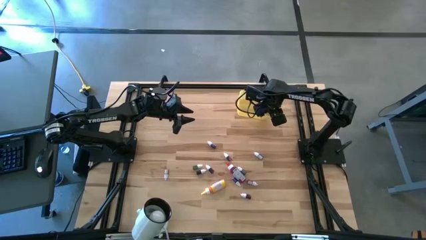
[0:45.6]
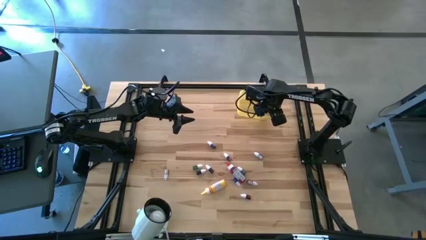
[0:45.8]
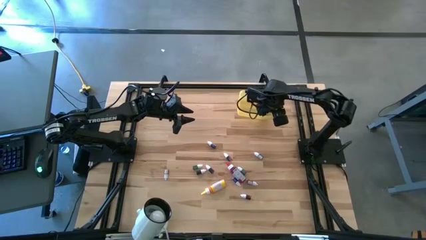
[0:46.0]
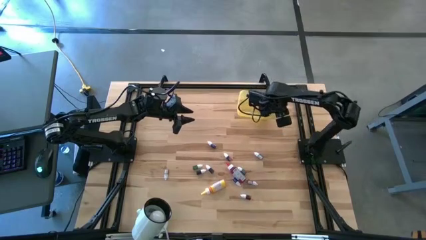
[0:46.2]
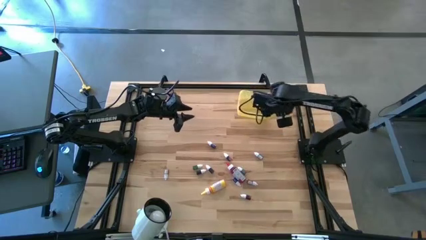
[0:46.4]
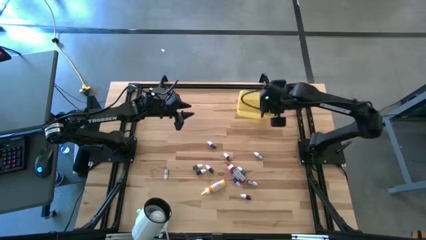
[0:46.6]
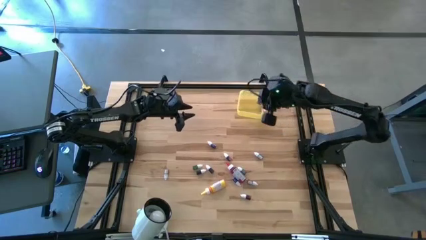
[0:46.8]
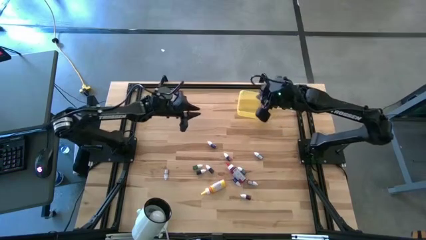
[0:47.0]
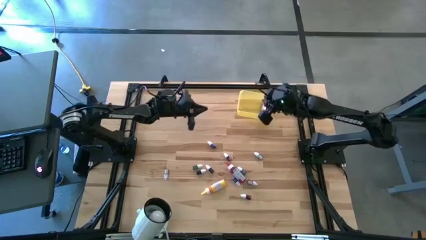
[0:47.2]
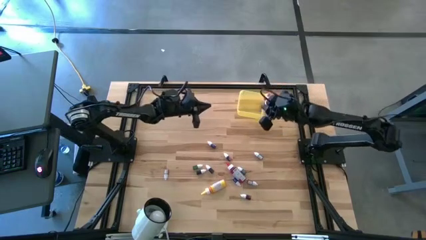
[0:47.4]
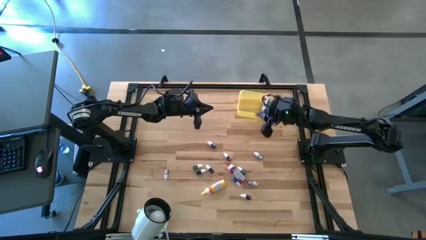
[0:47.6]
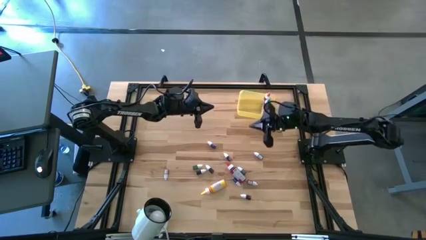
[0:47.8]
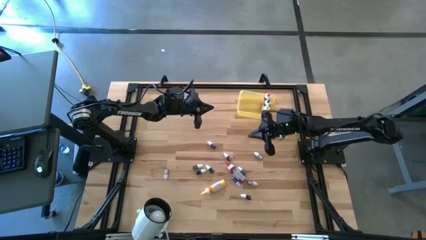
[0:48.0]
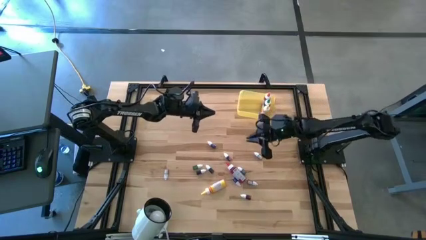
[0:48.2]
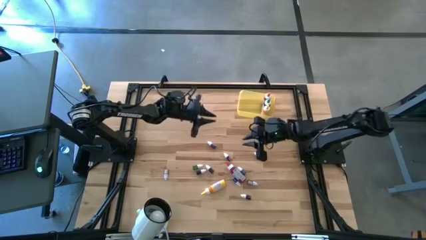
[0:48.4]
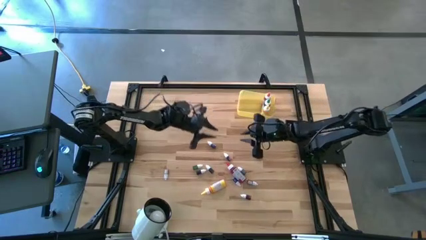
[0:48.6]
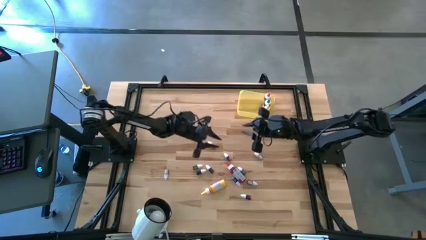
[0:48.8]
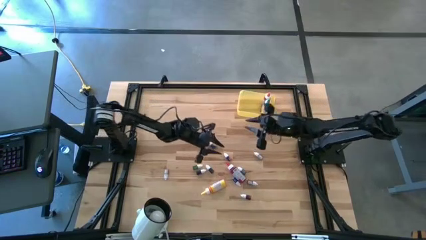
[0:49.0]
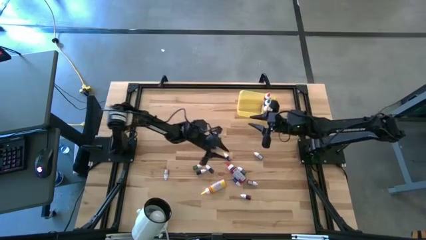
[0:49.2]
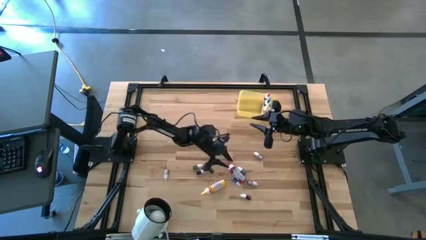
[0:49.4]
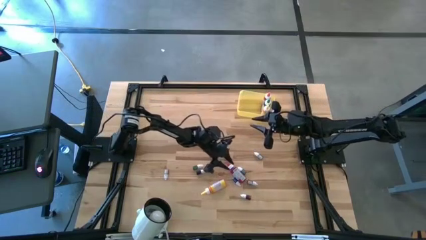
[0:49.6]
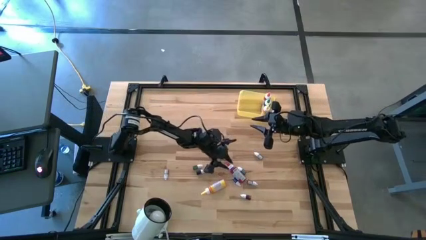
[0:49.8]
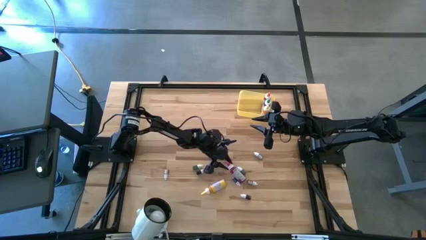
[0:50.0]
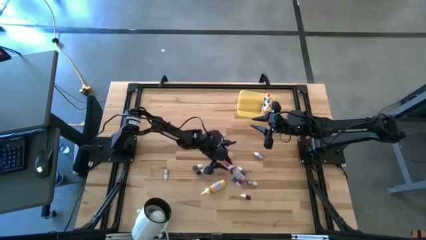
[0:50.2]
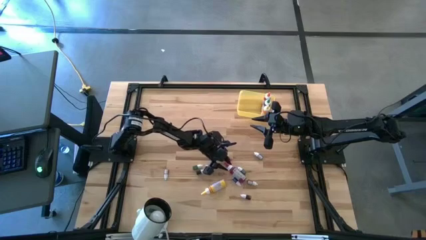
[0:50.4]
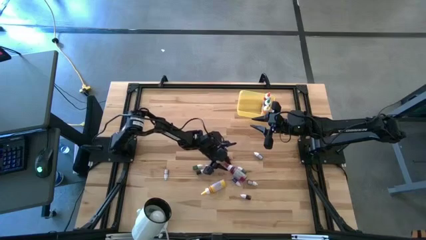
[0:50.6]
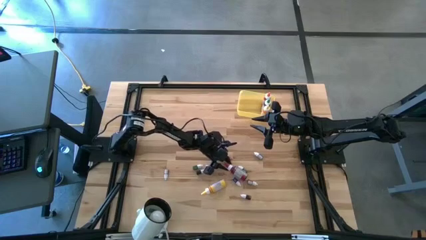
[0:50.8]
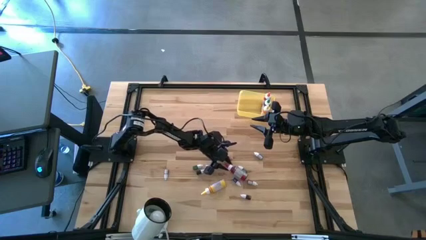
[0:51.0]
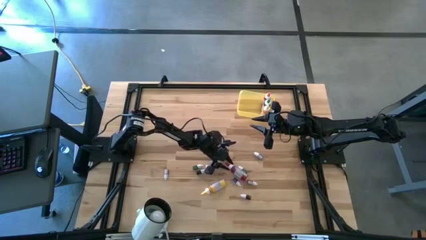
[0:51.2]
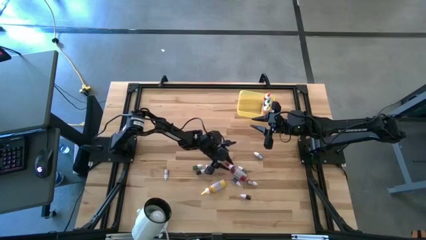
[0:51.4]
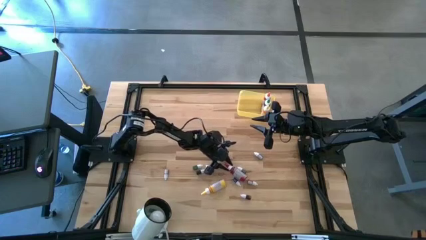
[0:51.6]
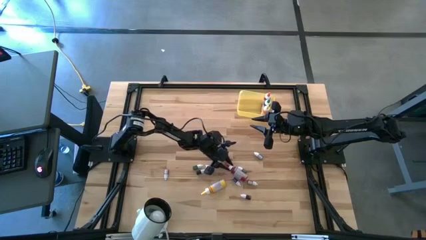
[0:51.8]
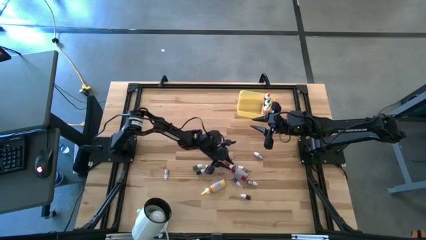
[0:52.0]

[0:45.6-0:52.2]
Task: Pick & Place food coloring
Put the big red food coloring bottle into the yellow bin

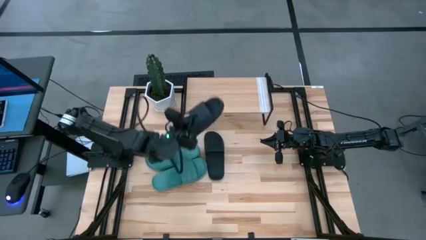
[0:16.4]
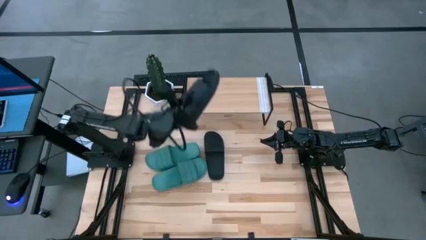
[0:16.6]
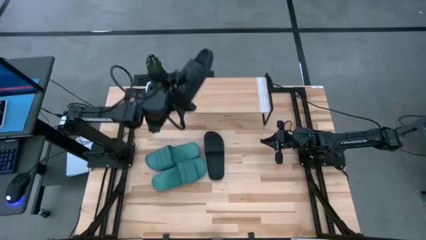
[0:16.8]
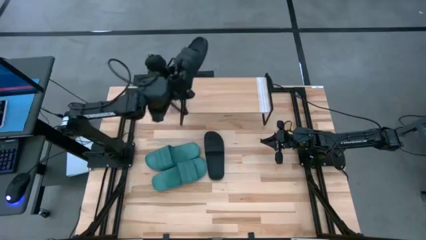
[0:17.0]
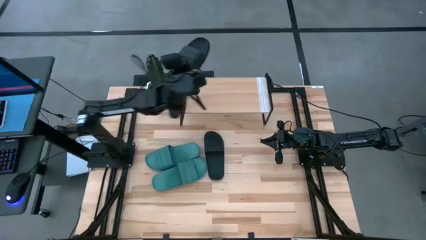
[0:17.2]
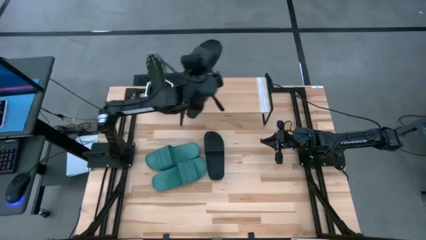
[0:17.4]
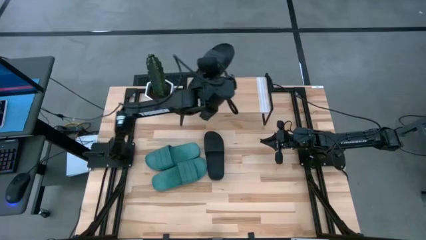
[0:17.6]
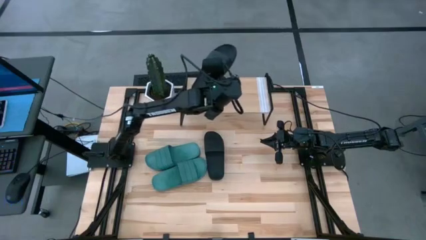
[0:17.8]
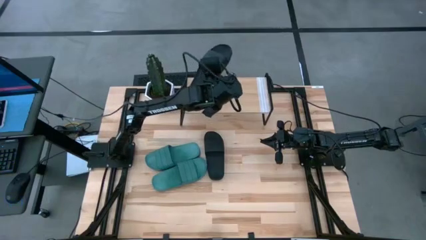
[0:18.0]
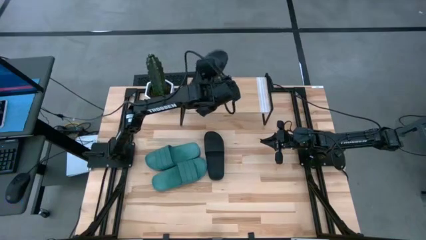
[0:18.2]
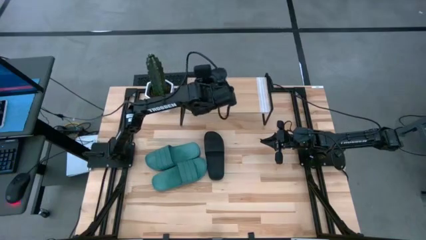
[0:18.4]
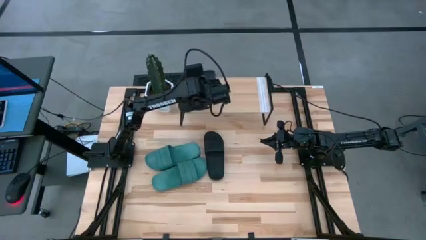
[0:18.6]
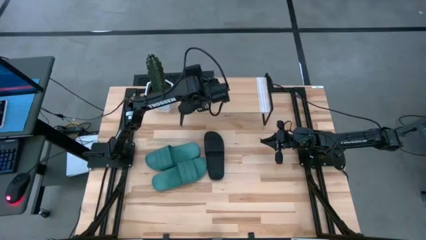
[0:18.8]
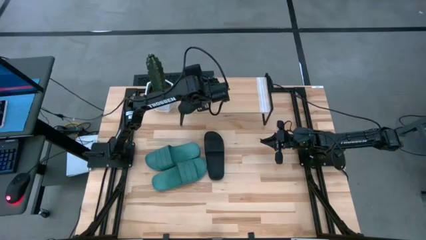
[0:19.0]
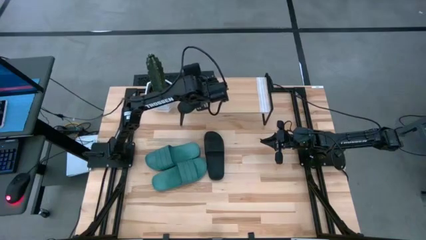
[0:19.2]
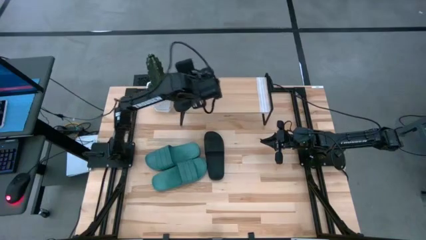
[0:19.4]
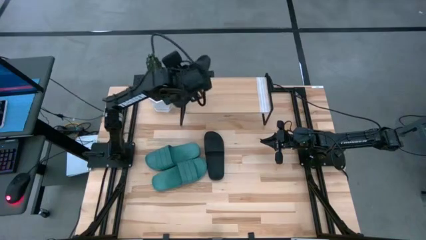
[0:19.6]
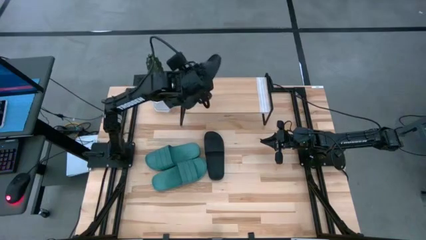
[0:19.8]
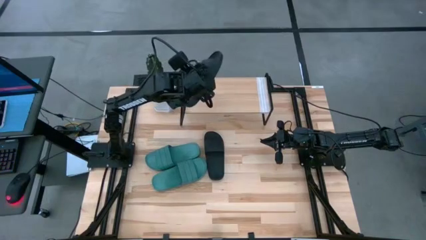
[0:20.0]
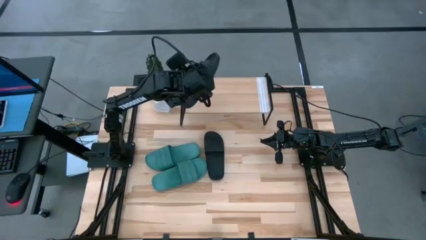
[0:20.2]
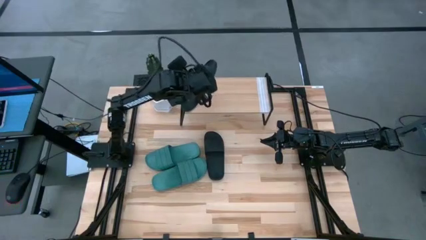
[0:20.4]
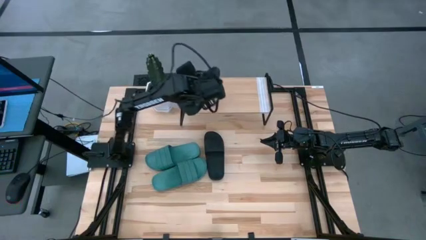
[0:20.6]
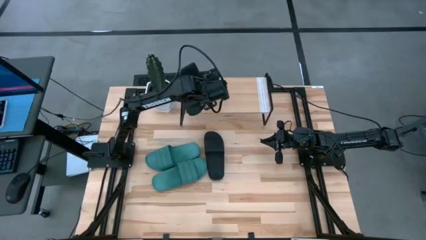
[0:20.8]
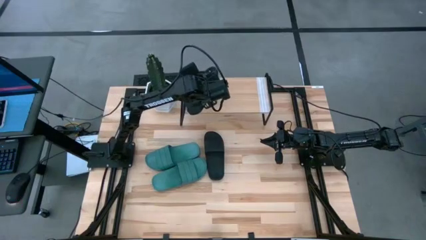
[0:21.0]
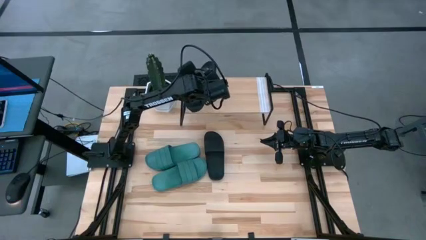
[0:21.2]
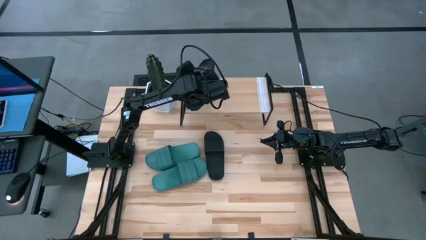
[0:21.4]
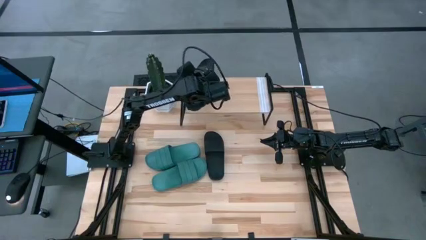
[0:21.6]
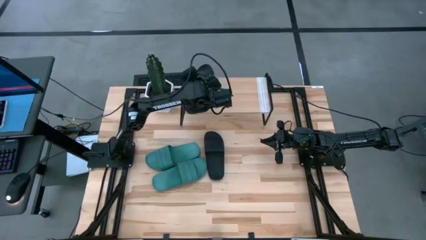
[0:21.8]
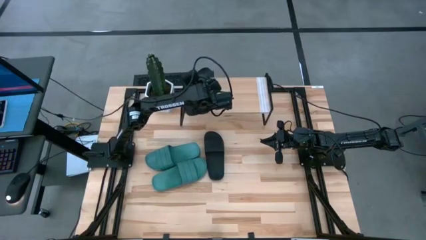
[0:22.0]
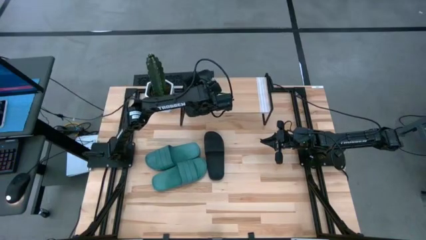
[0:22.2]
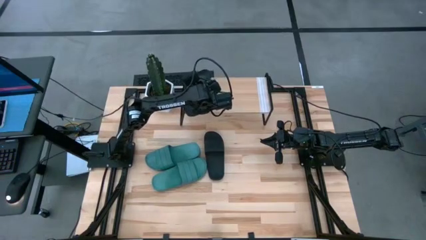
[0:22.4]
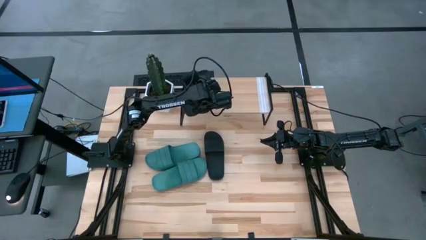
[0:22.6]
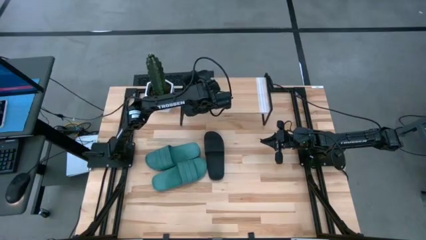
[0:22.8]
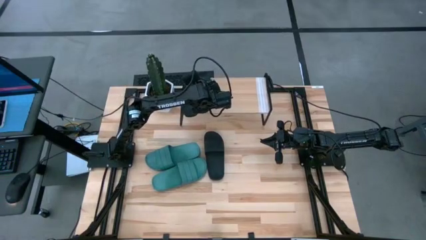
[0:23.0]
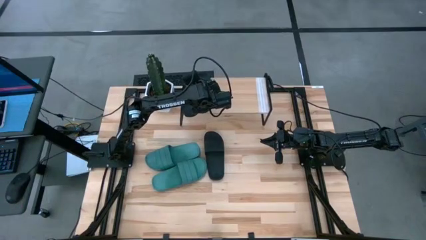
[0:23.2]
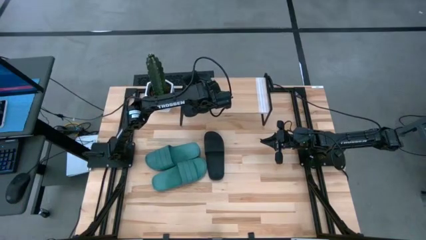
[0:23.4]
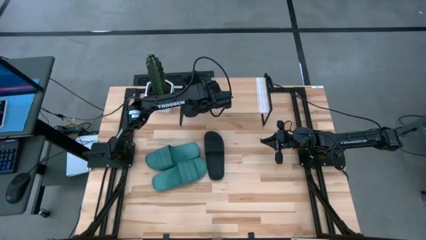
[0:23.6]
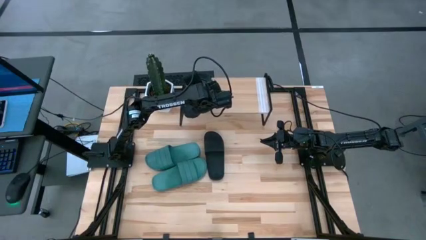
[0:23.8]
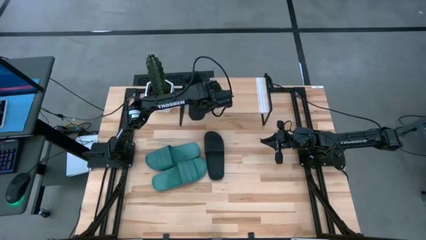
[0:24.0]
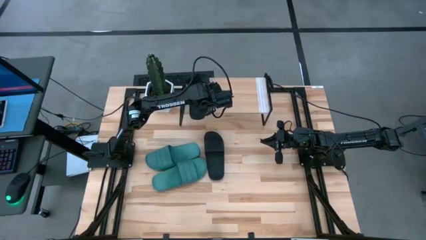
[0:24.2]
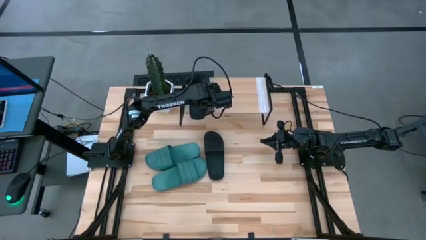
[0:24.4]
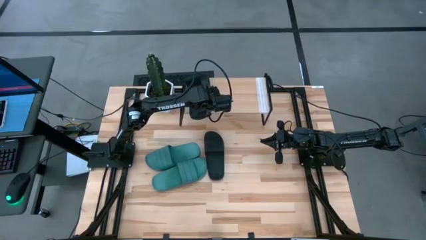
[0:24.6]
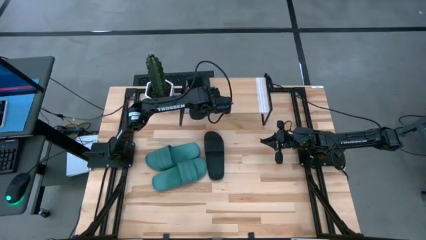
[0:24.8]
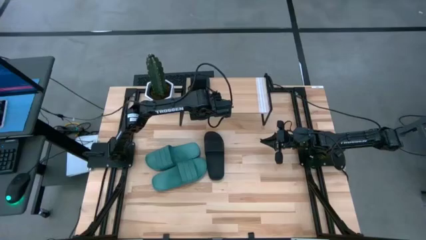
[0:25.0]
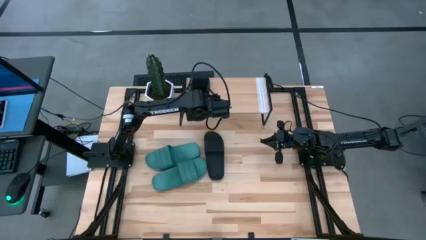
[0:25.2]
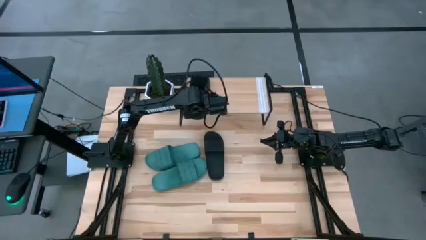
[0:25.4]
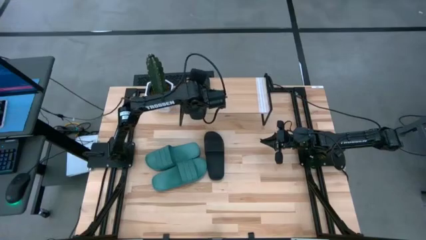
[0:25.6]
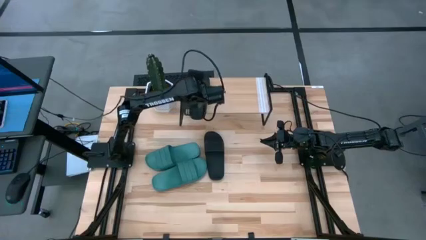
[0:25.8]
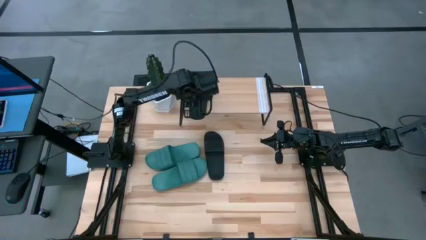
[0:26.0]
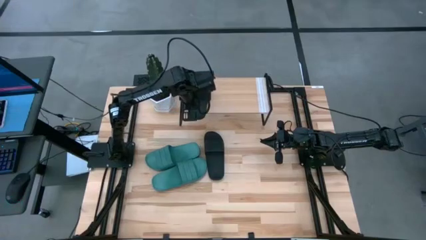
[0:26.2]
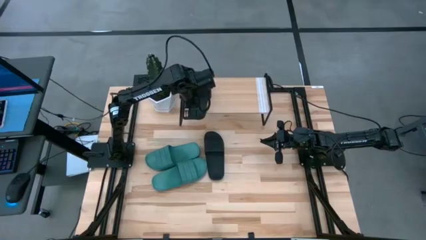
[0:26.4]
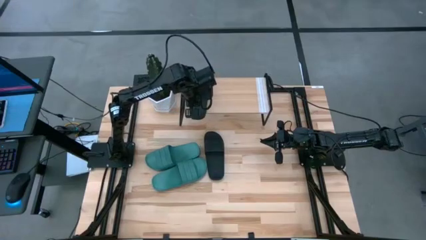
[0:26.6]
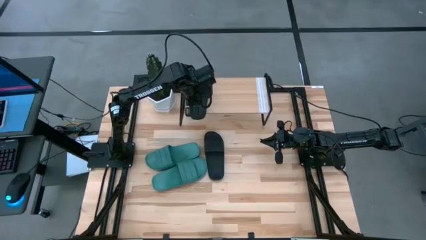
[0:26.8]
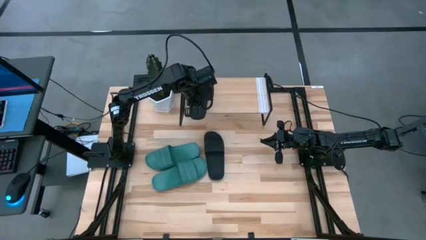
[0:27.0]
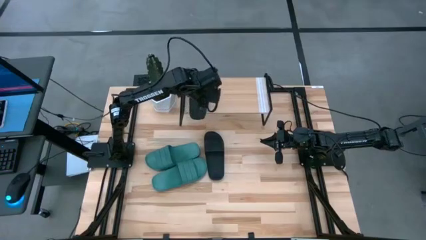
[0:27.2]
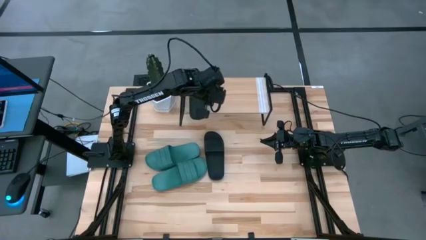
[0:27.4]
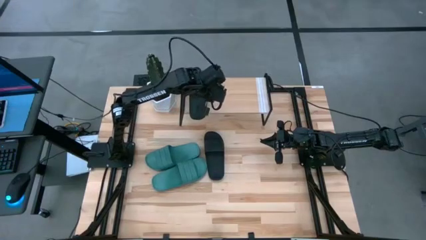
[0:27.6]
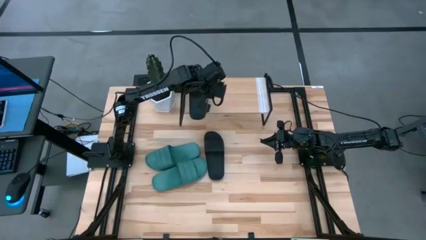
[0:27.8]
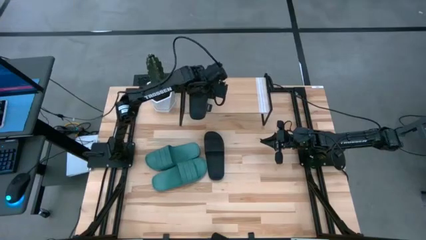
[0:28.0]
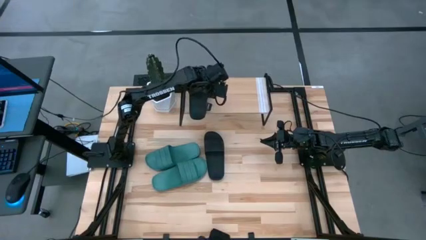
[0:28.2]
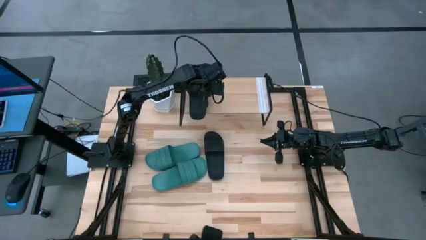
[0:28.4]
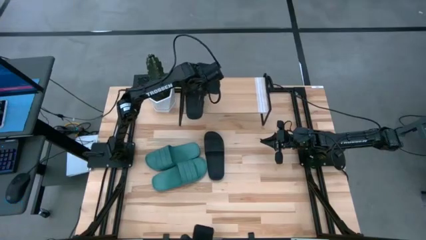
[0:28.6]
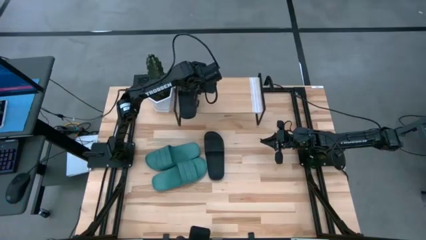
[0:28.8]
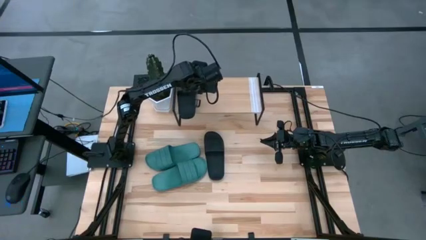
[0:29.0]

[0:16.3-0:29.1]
Task: Pick and place slides into the shelf
Put the left black slide on the shelf
